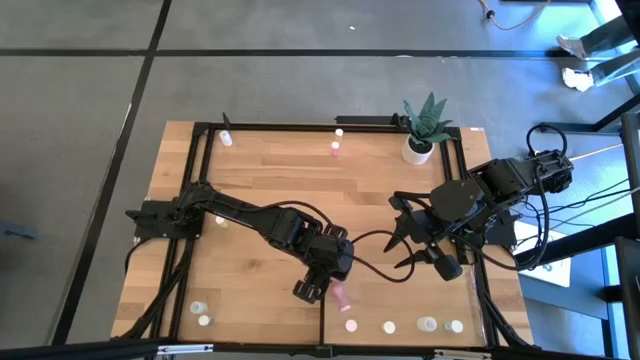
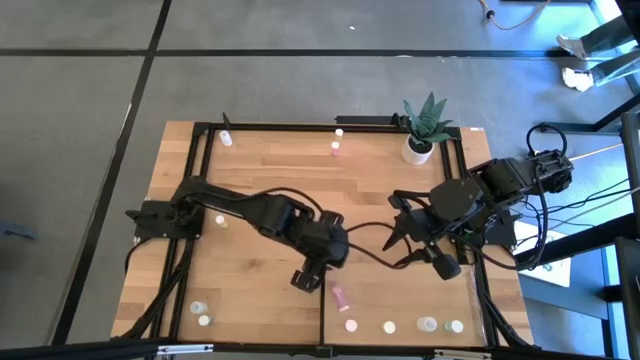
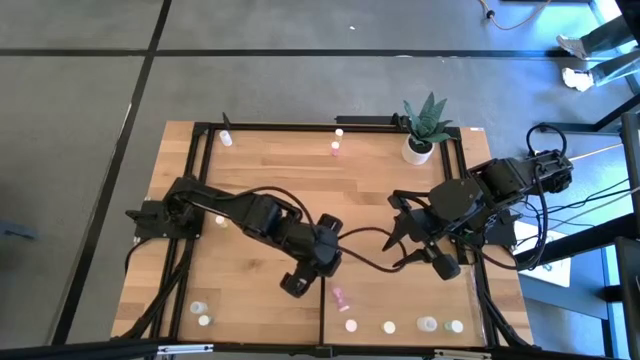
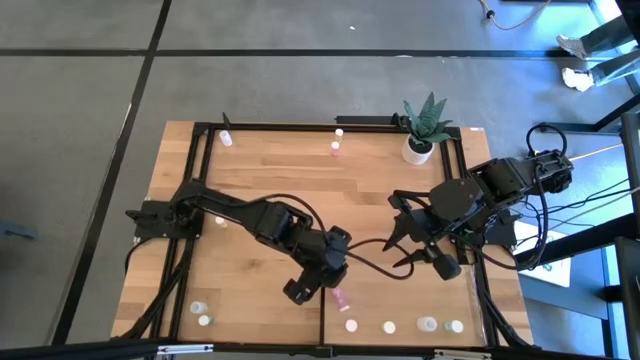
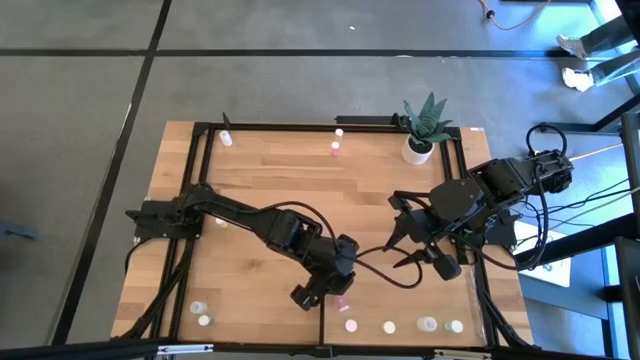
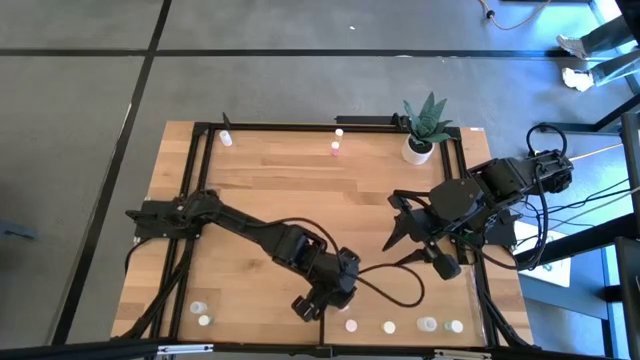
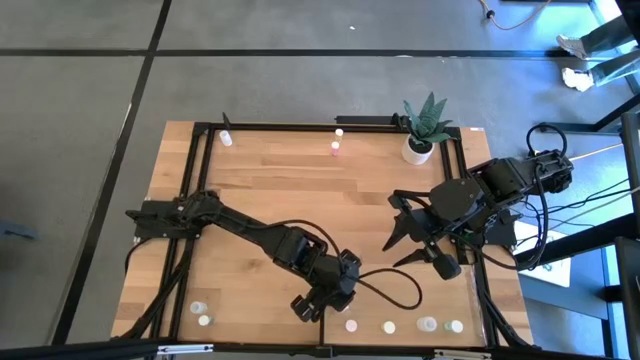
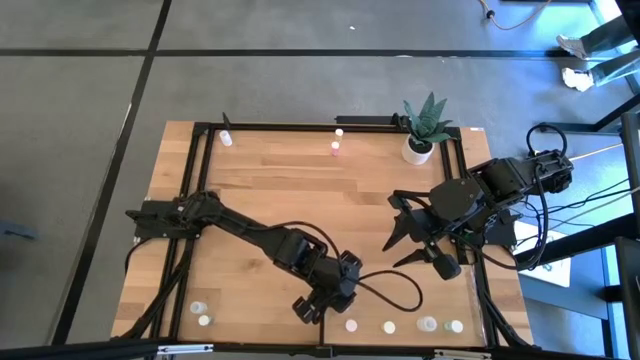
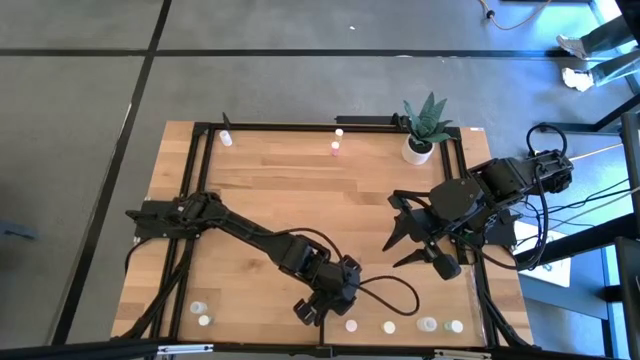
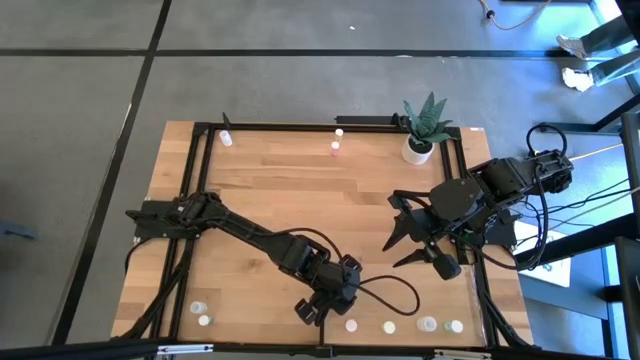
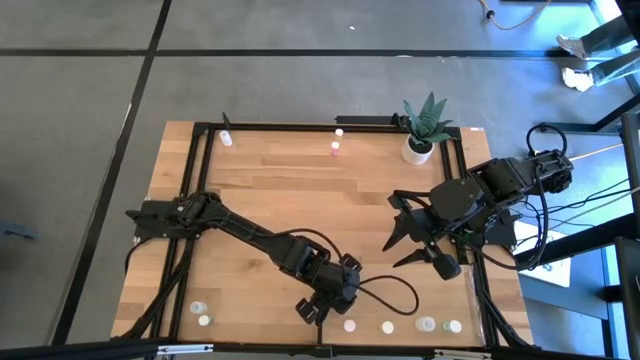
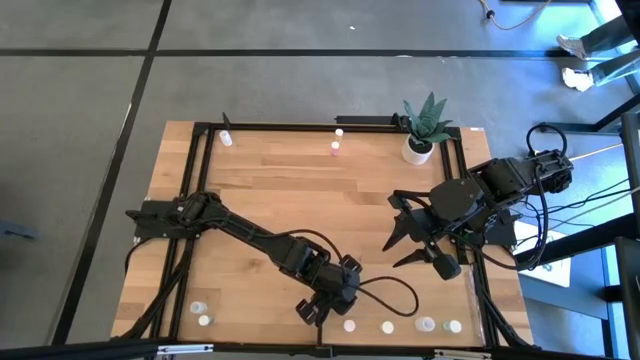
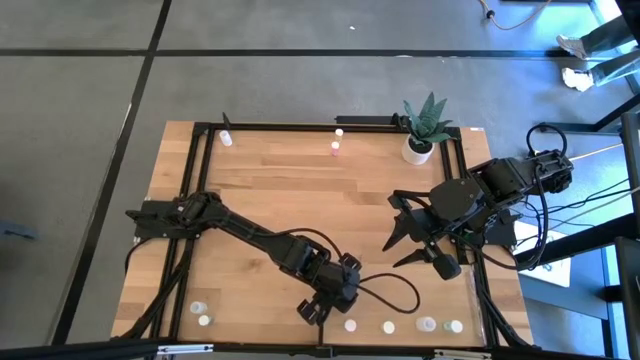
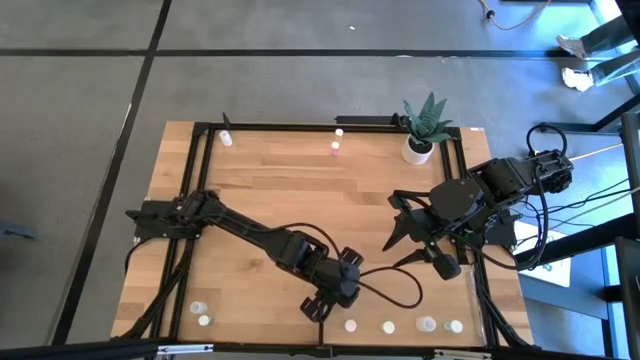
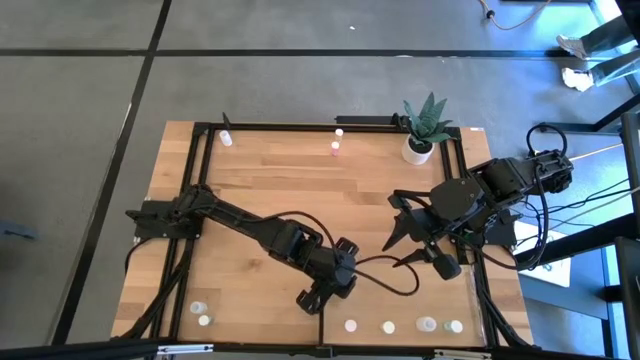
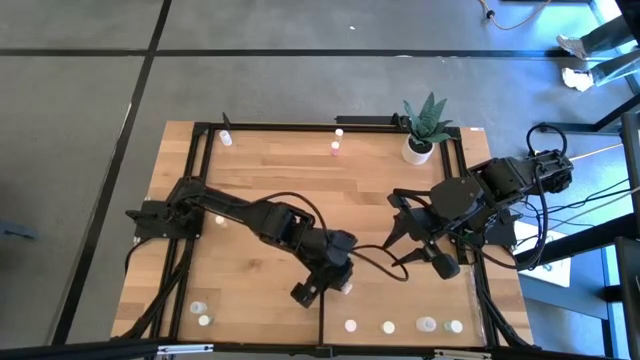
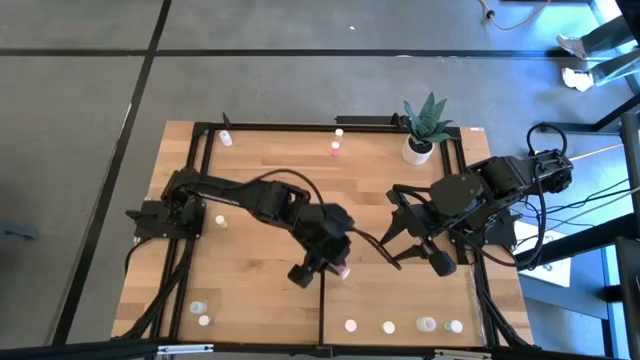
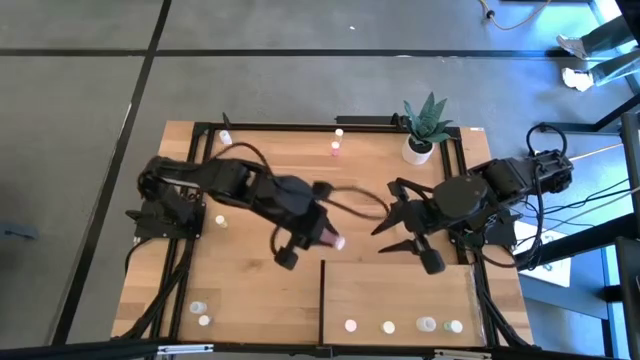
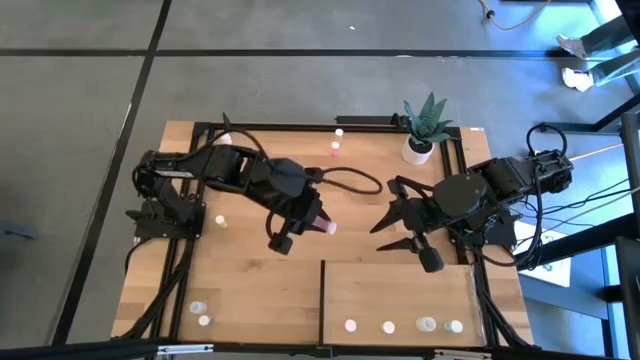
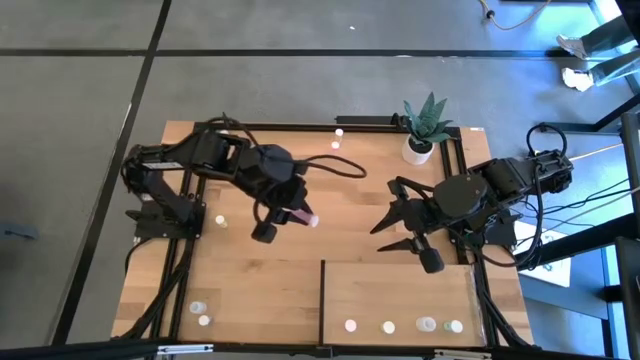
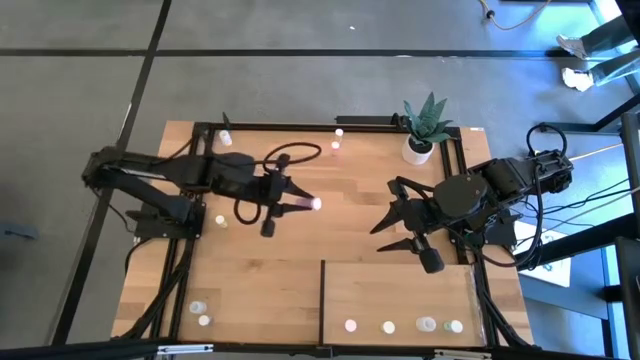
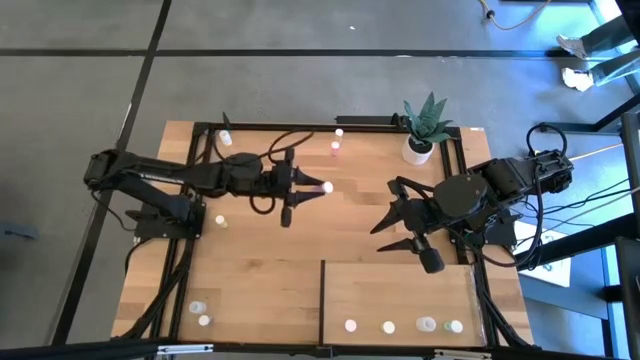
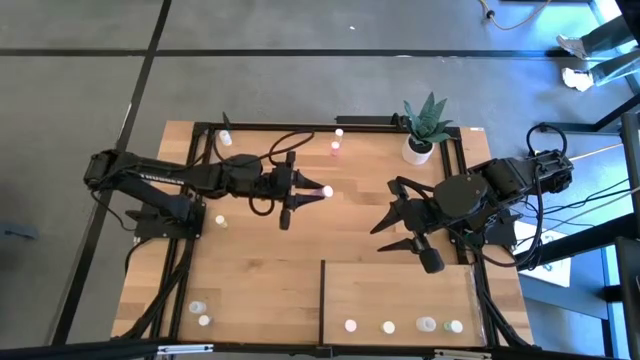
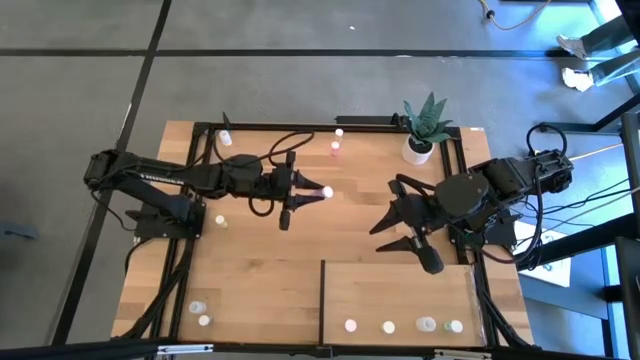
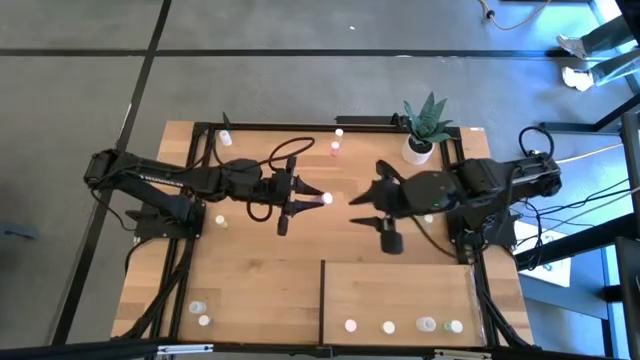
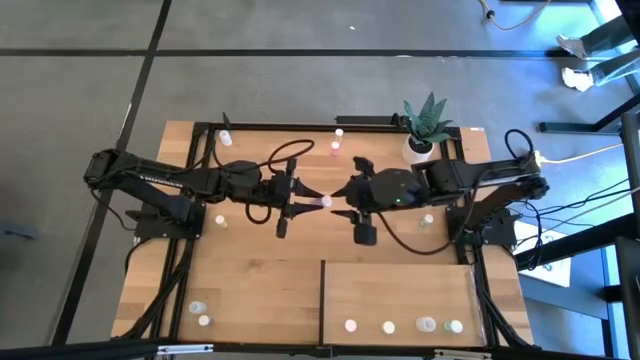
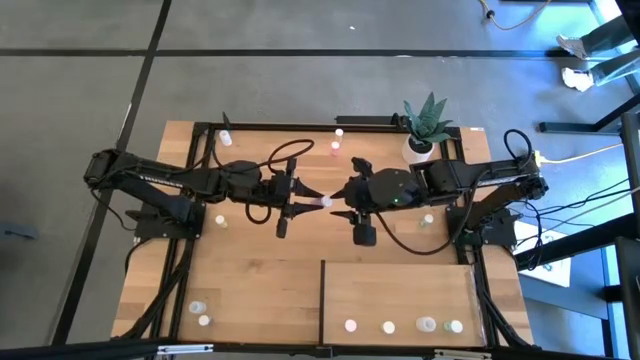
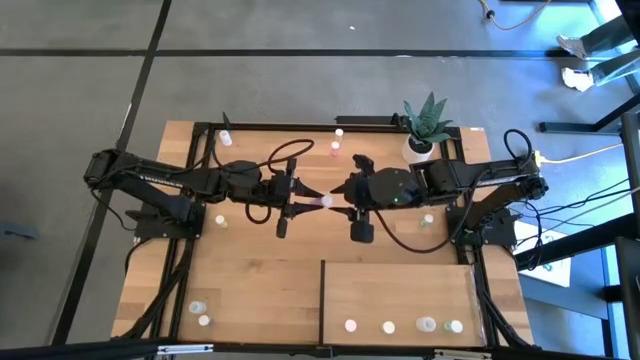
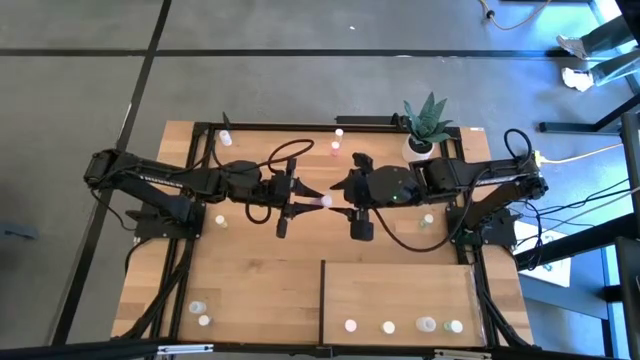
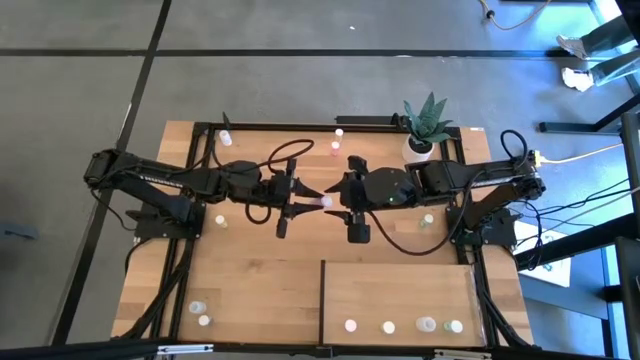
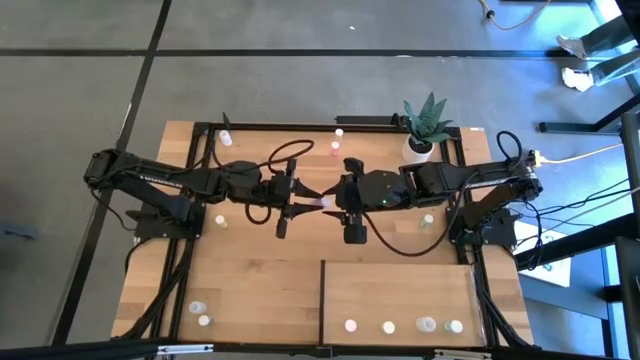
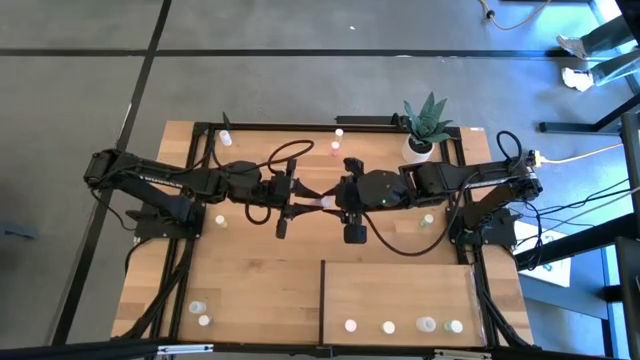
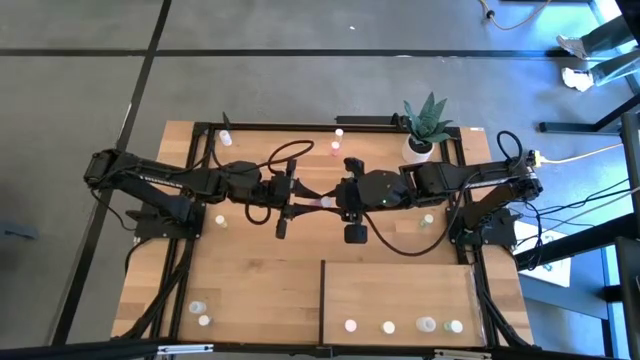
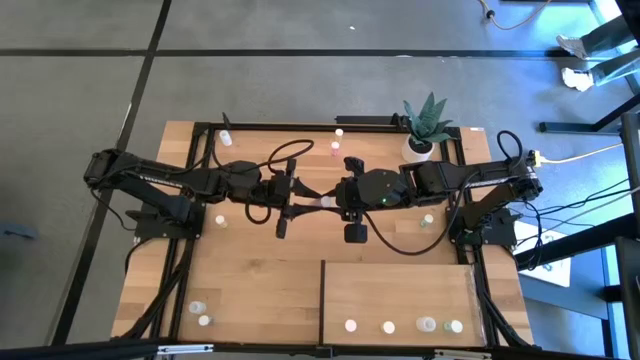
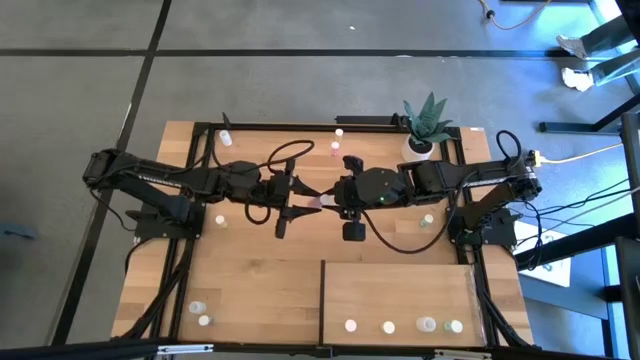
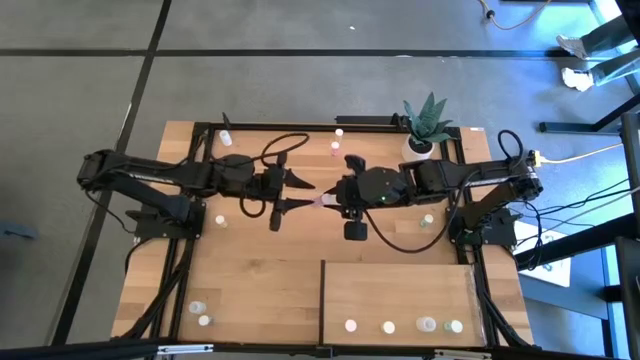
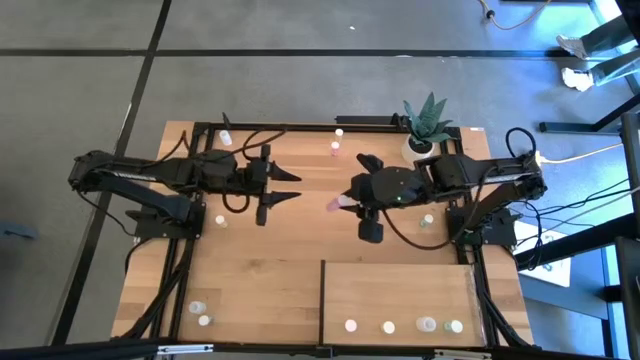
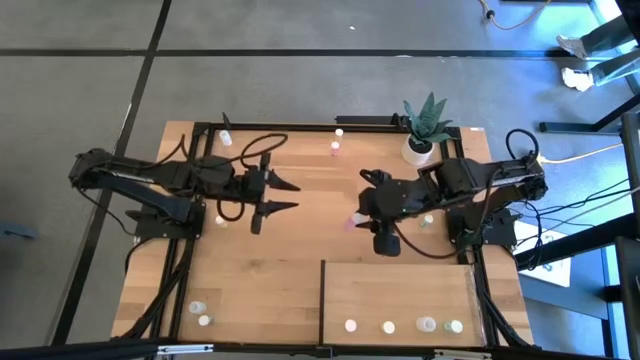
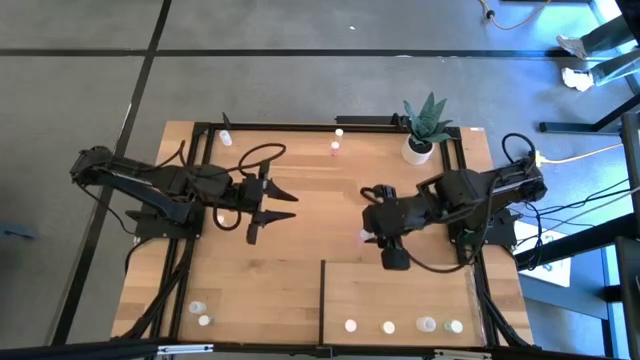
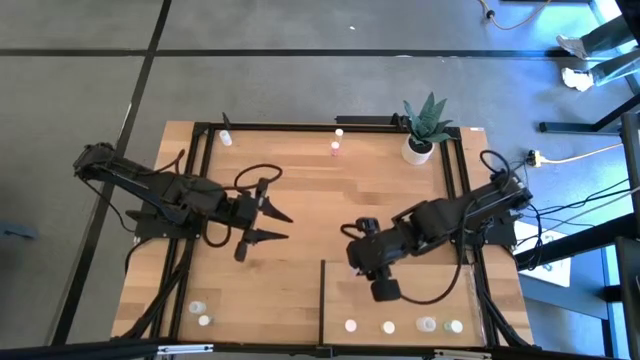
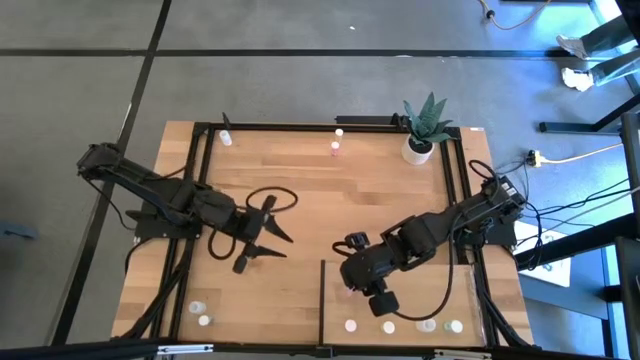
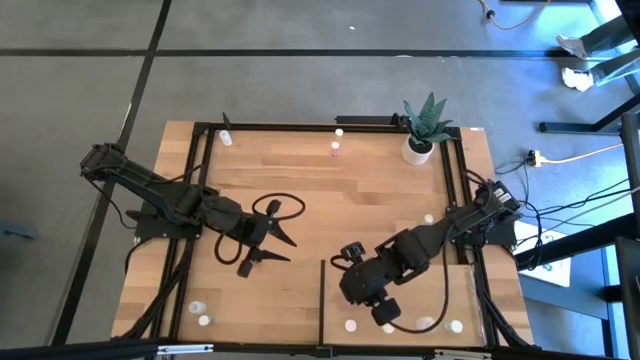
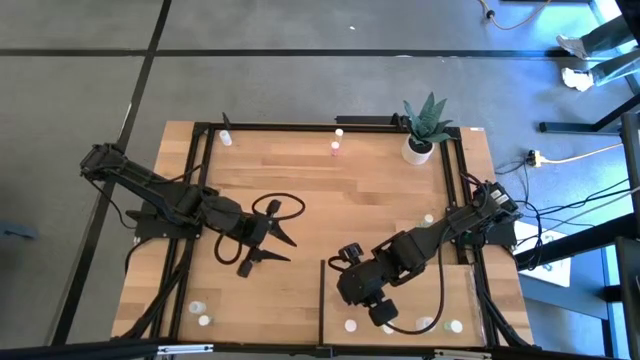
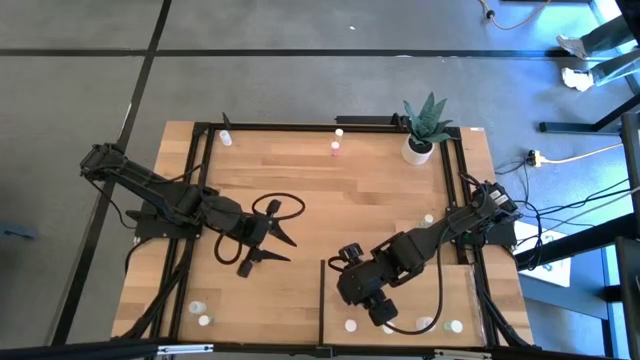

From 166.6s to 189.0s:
Task: Pick and place medicine bottles onto shelf by color
Put the bottom pink pill bottle on the shelf aligned with the other pink pill bottle
